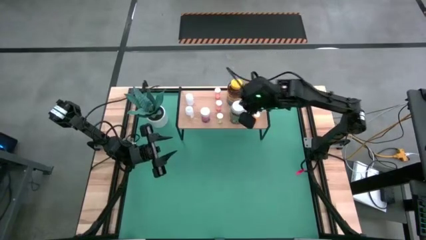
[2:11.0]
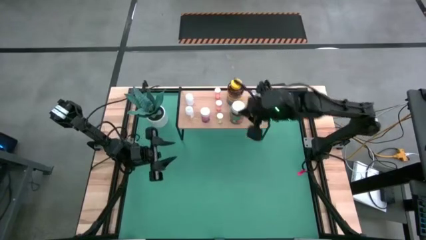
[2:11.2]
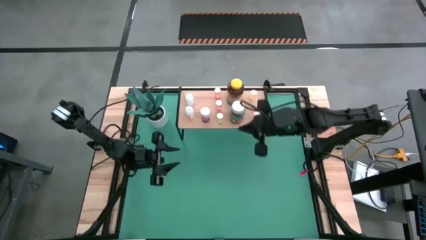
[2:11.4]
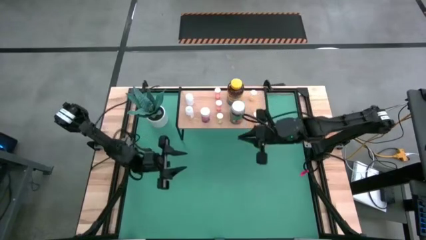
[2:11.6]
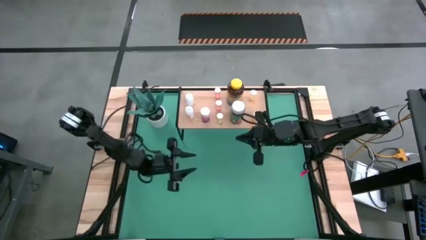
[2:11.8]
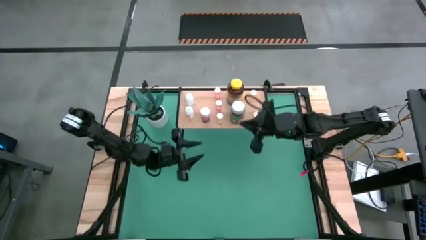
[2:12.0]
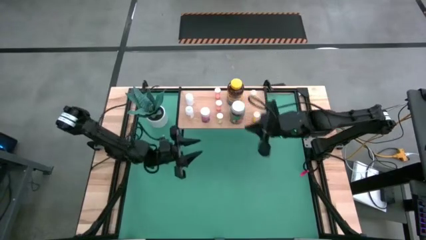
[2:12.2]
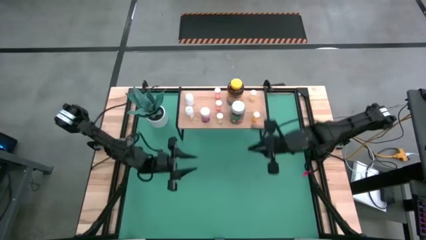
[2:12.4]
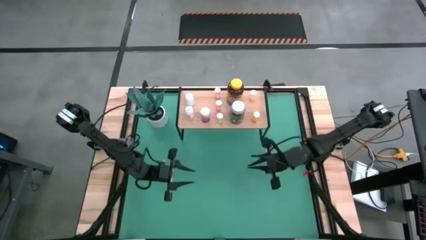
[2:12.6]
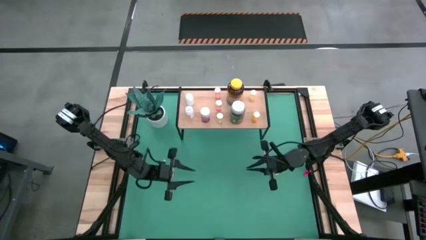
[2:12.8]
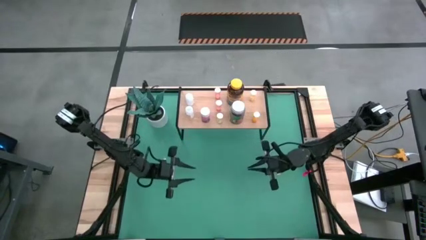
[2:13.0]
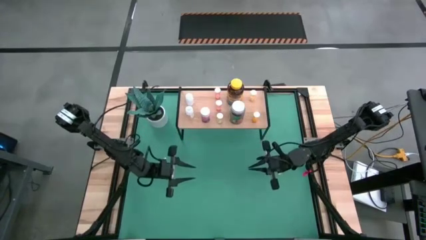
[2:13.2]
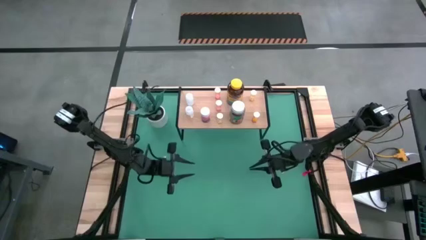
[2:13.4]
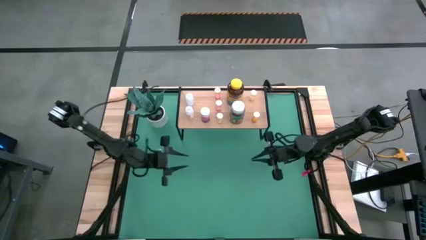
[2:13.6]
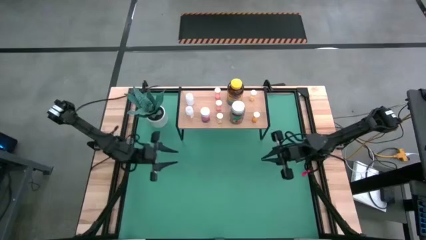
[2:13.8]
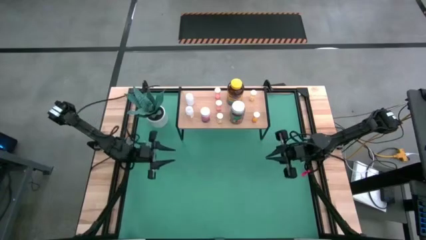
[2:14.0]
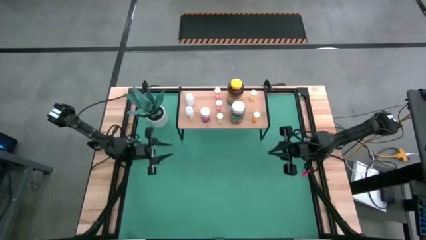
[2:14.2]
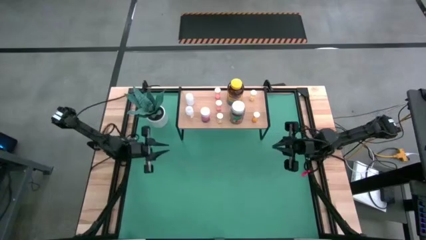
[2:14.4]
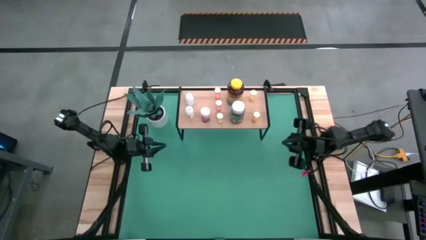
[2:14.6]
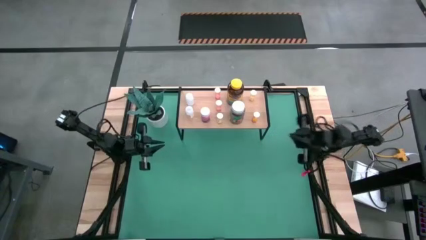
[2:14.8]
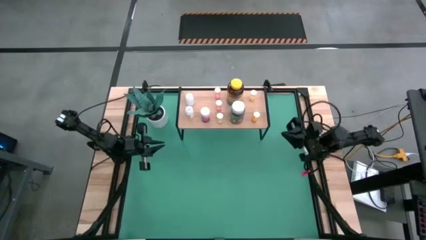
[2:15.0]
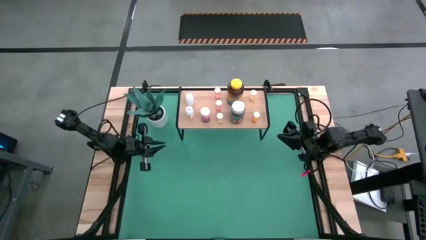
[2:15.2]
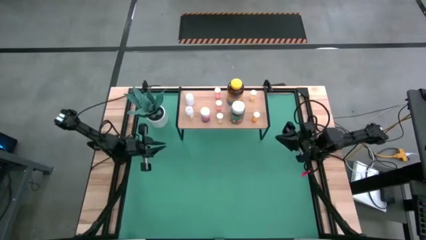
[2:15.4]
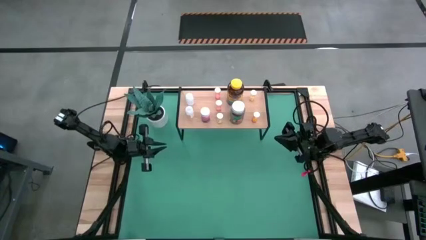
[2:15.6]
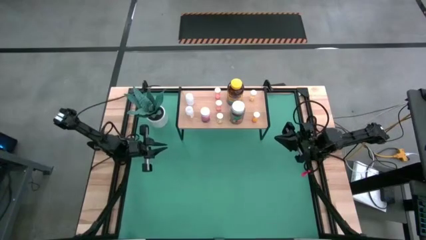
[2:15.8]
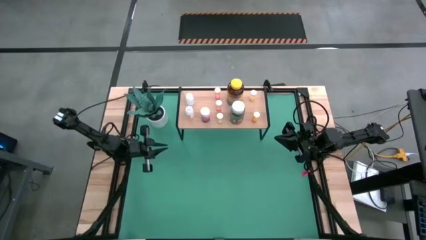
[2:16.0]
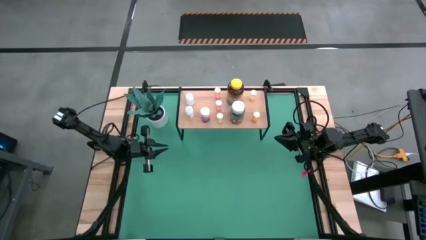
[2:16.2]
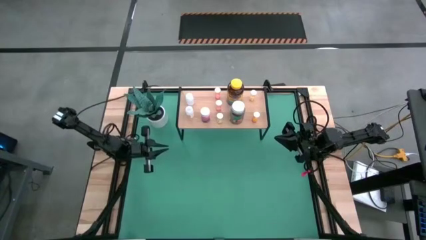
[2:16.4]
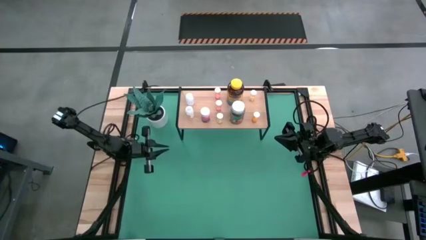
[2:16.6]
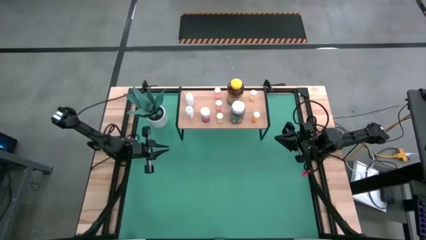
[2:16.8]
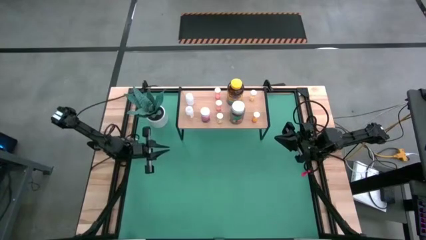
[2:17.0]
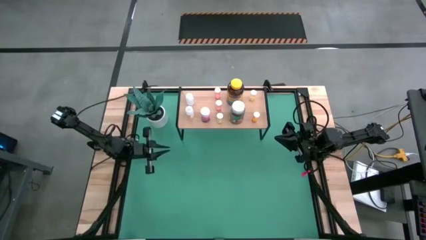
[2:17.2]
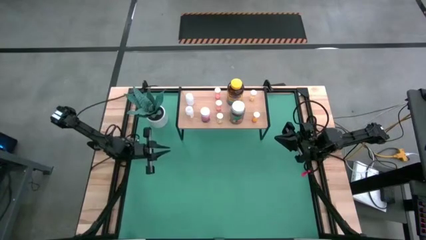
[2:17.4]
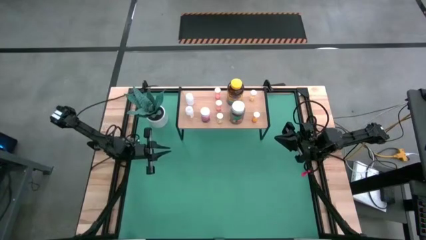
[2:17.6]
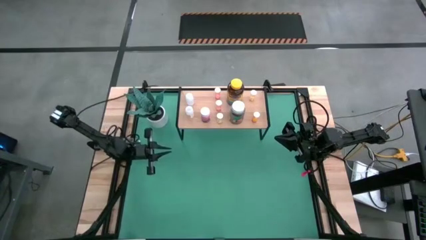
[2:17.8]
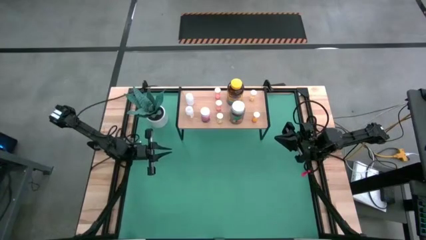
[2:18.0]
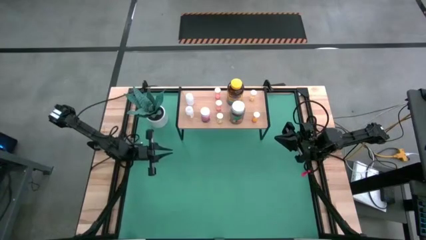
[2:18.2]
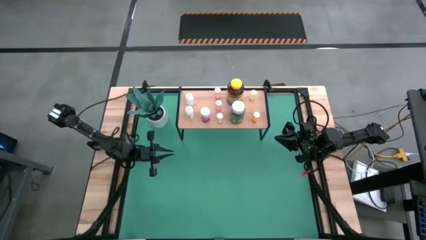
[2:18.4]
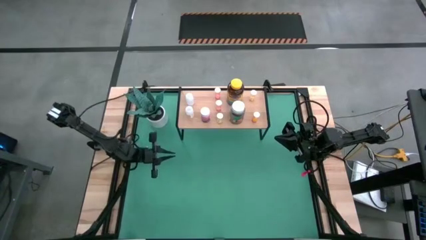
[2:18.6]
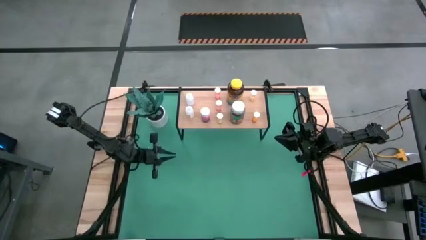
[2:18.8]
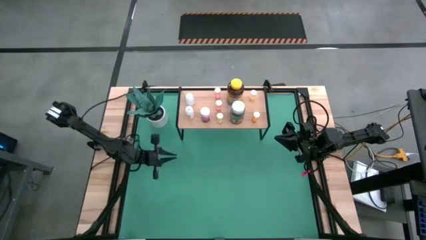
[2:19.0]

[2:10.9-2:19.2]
Task: Pick and place medicine bottles onto shelf by color
Return to Home Position

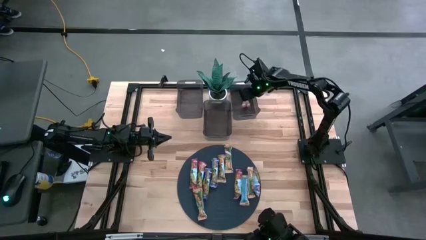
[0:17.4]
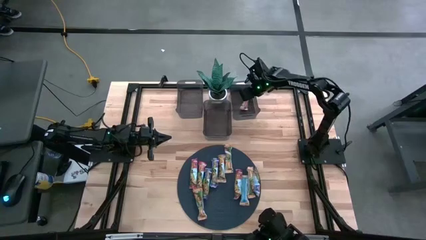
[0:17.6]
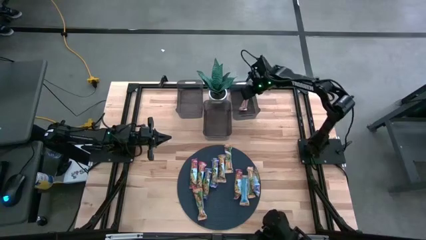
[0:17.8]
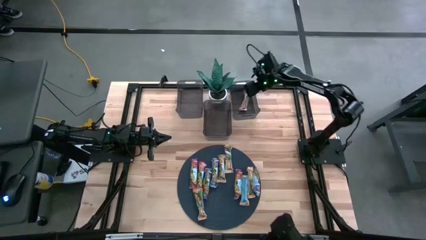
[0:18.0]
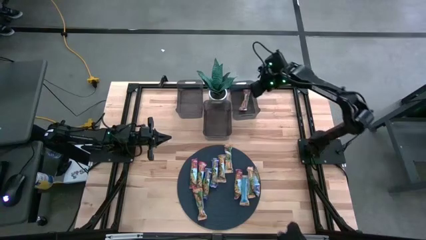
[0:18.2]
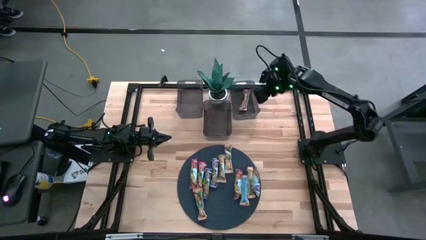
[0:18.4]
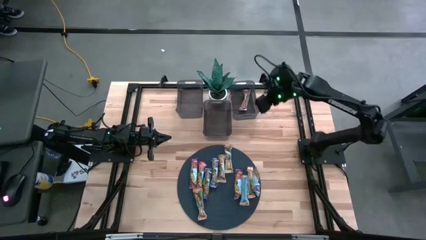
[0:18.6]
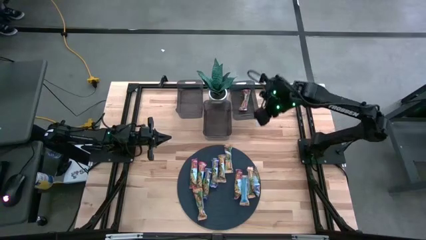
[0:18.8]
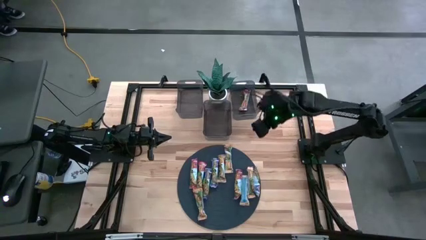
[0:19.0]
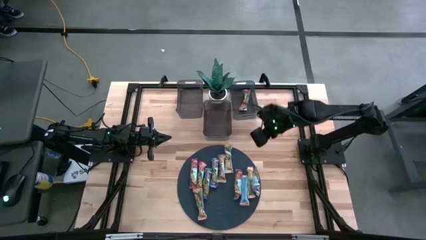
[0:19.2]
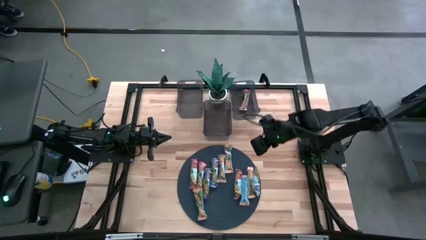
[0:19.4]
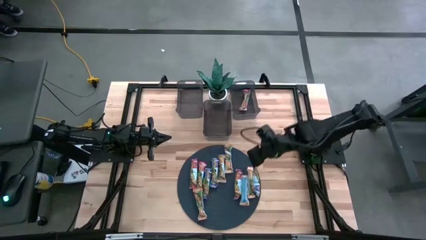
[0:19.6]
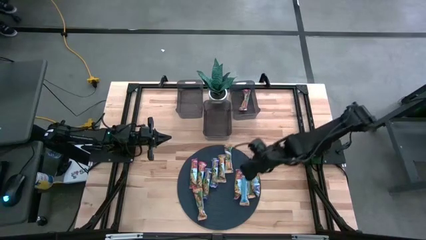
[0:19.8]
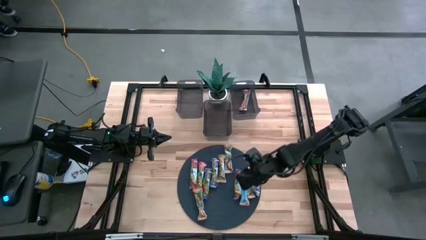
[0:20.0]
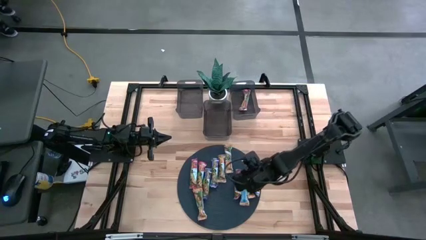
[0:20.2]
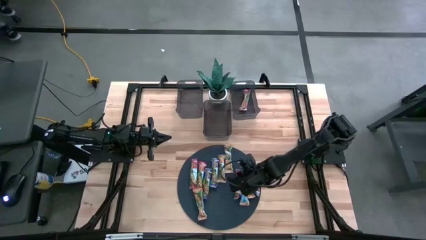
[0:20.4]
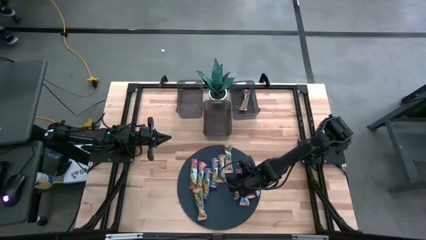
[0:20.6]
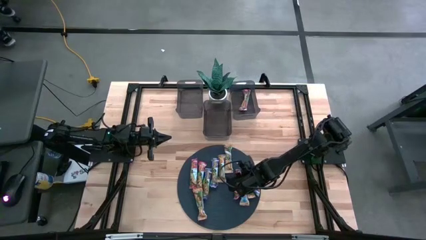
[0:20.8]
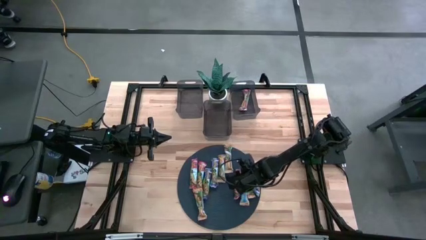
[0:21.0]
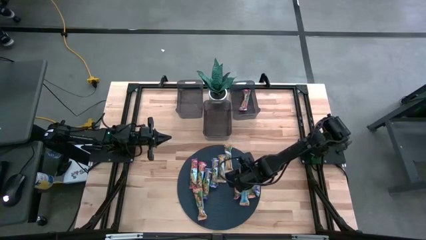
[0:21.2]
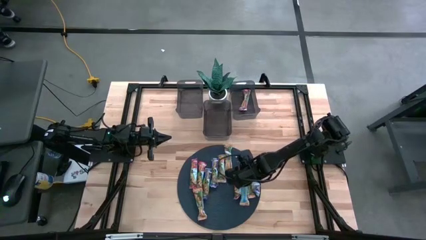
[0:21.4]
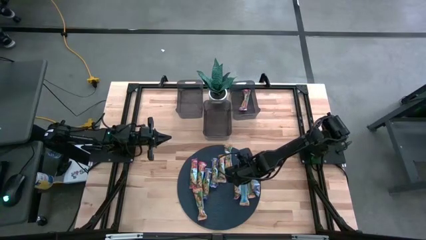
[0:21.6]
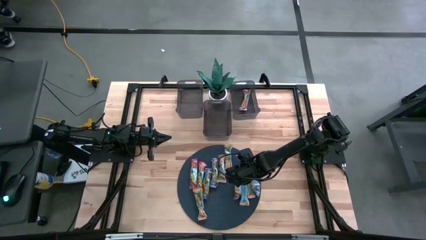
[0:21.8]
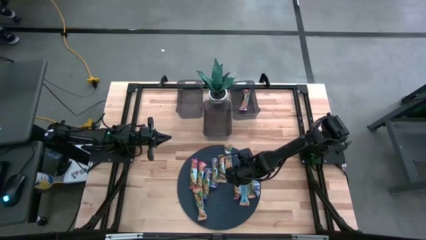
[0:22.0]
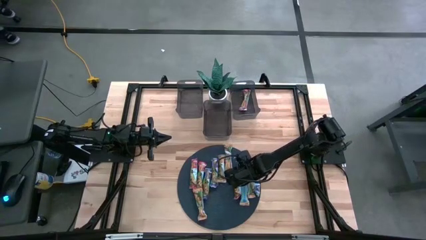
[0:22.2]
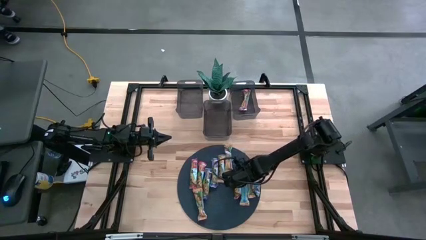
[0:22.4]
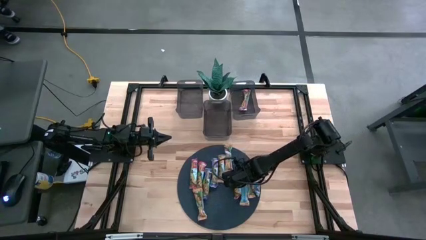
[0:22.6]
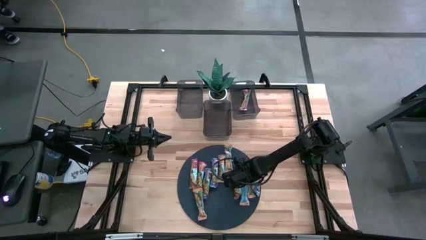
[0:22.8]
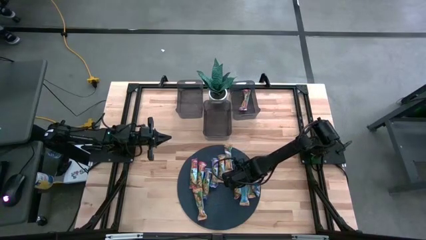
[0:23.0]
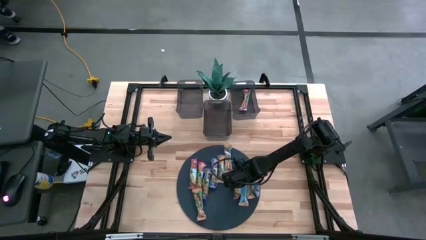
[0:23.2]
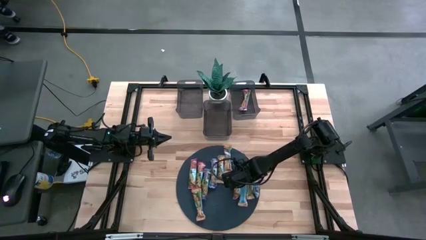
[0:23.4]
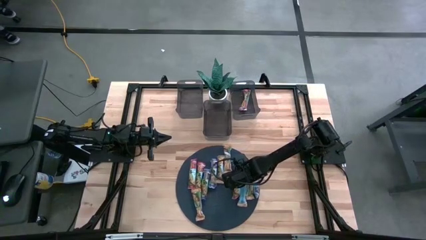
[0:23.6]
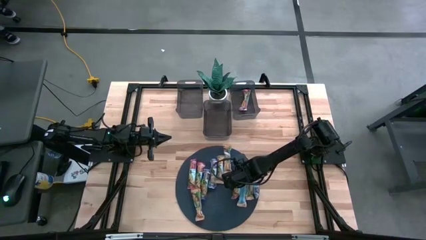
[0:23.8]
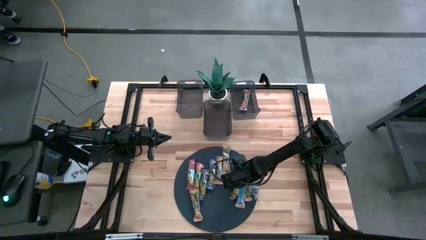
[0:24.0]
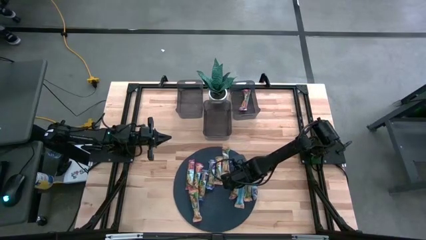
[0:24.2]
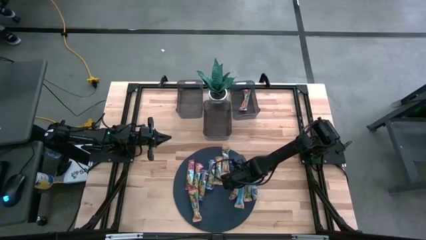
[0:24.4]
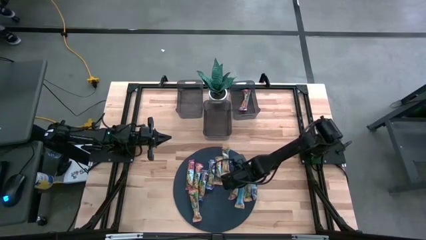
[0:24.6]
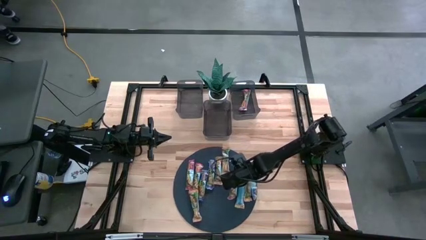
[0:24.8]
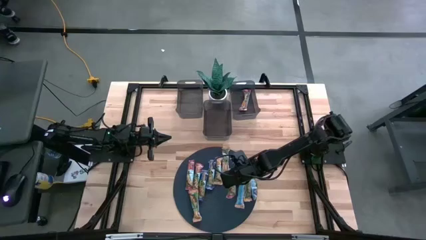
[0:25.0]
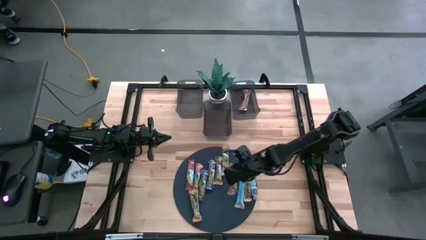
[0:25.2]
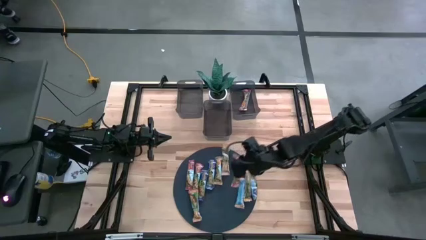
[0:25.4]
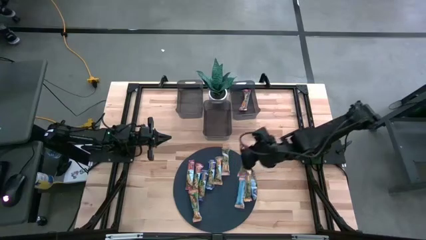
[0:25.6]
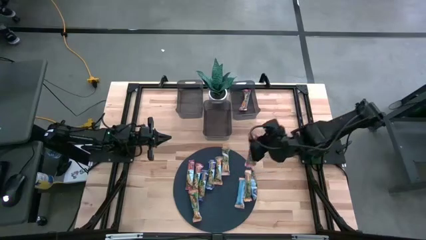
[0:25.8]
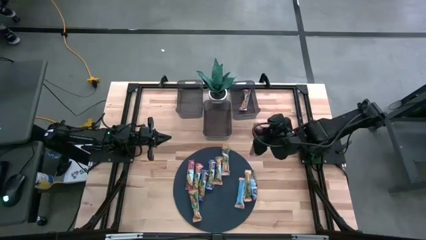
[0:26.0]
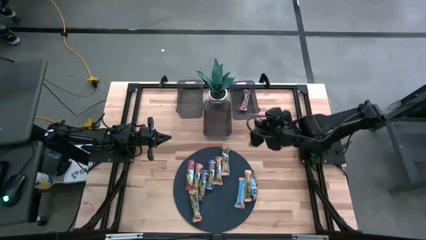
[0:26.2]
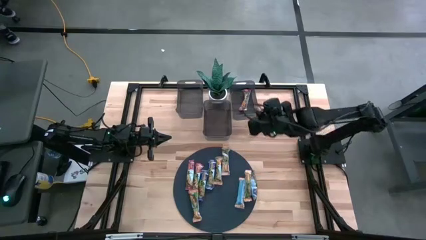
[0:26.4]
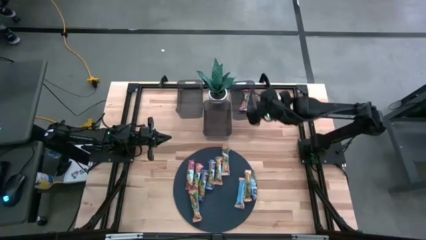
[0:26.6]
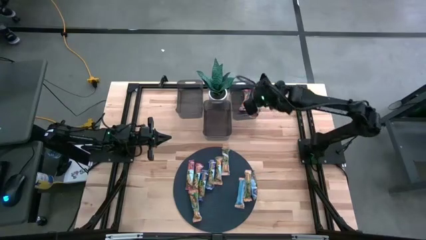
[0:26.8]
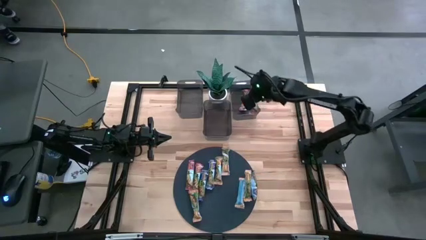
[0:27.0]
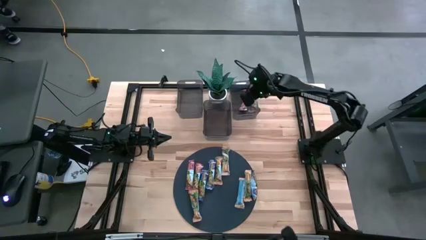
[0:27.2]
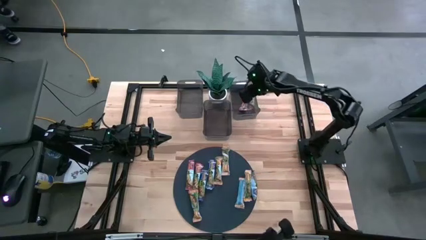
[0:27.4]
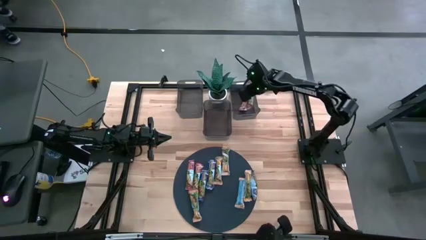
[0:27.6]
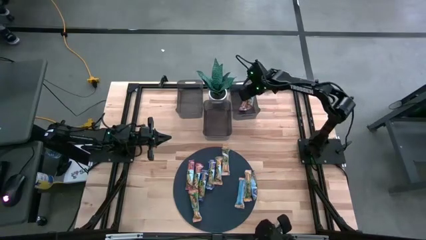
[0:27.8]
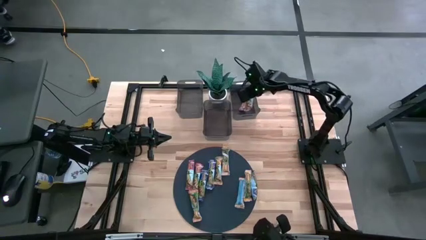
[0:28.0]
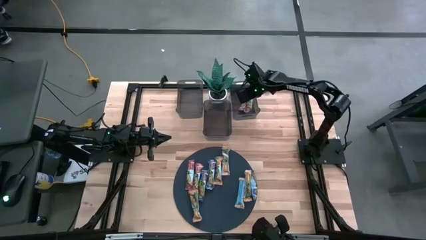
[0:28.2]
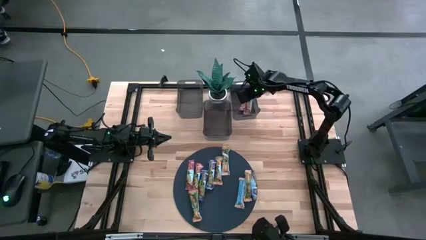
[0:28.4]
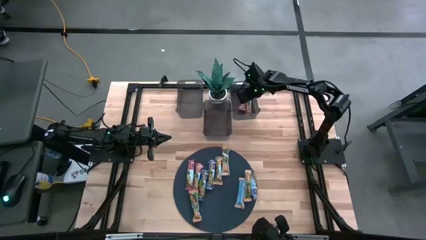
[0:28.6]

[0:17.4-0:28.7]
Task: Pick and place Granola Bars by type
Put the red granola bar into the right black bin
